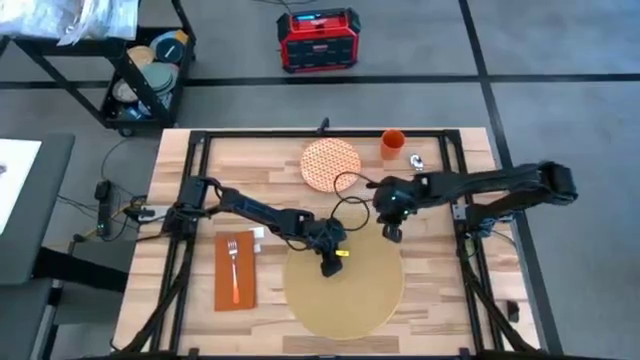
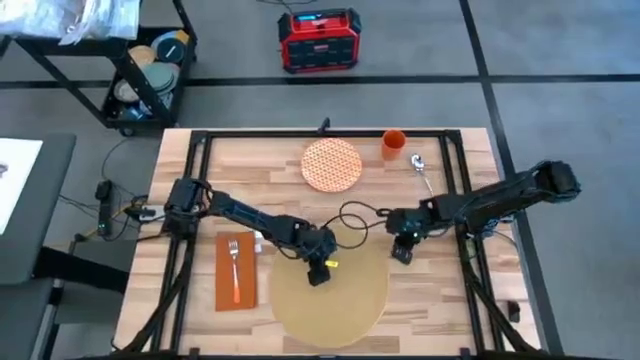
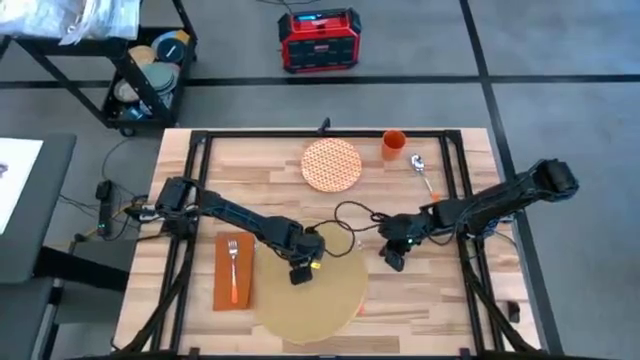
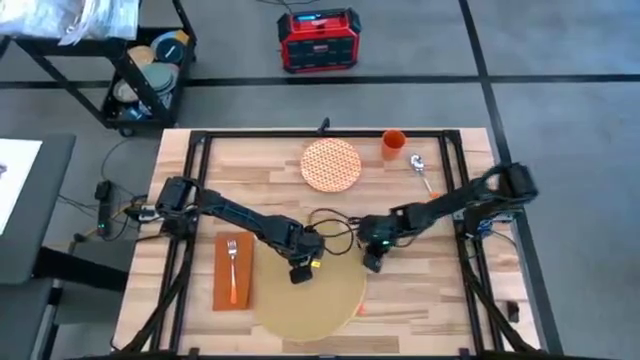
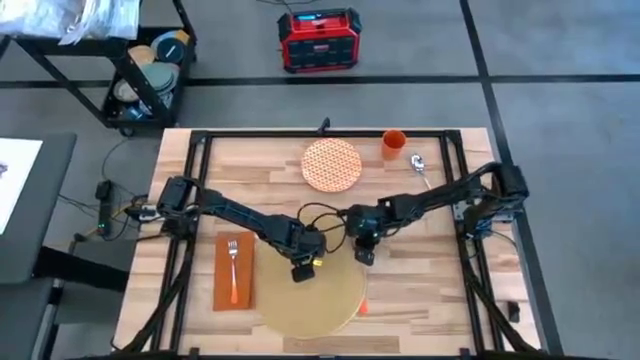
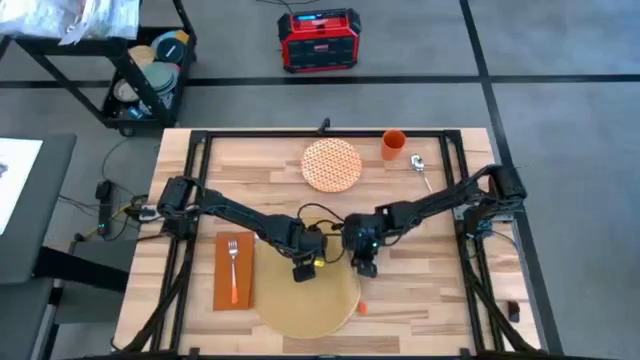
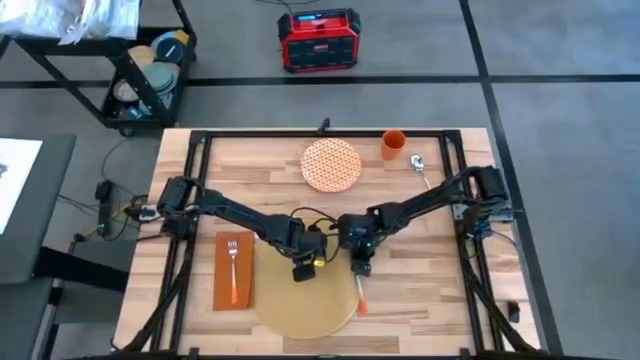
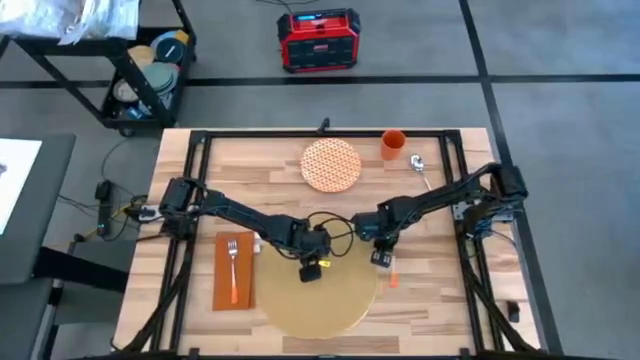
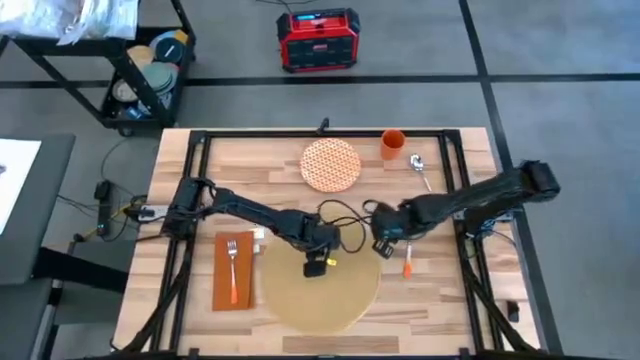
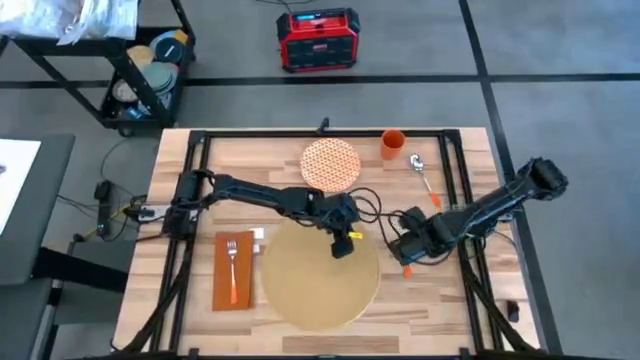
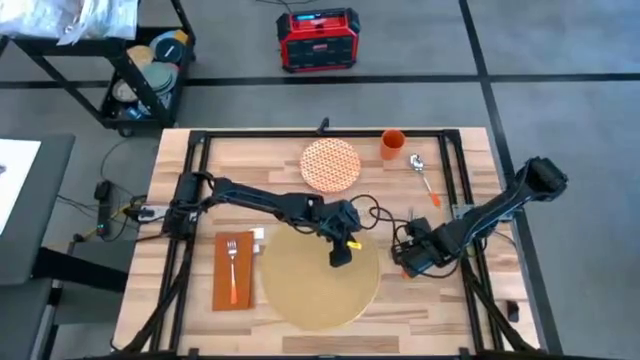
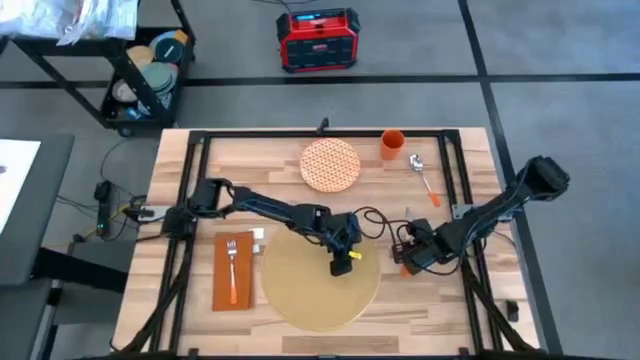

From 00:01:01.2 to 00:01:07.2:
Task: Set table place
Put the orange table knife on top of the brown placemat

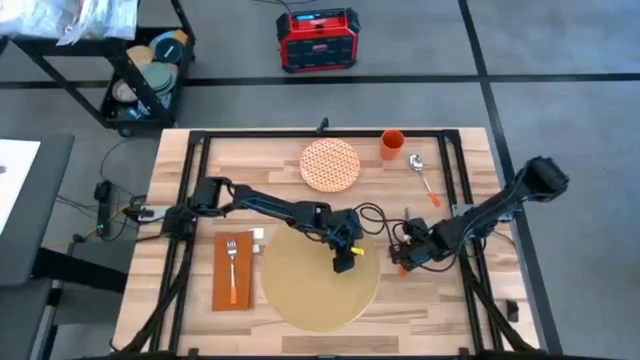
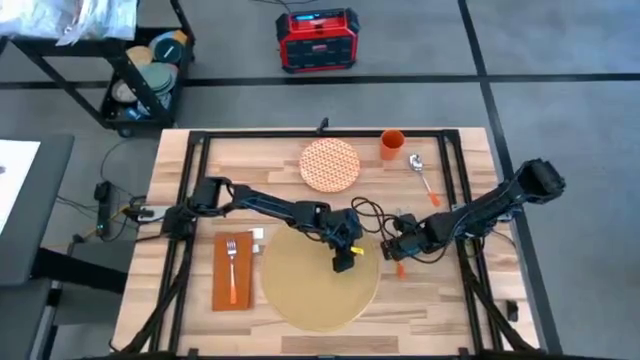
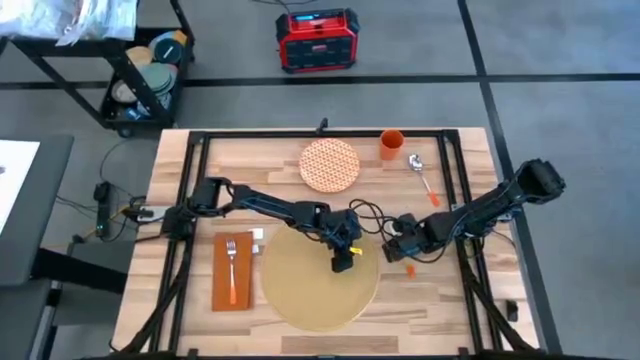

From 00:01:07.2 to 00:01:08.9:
Put the orange table knife on top of the brown placemat

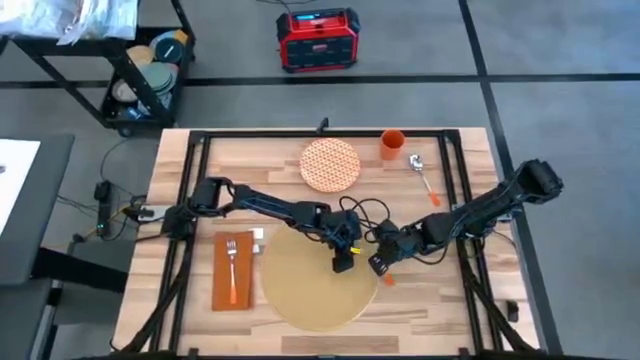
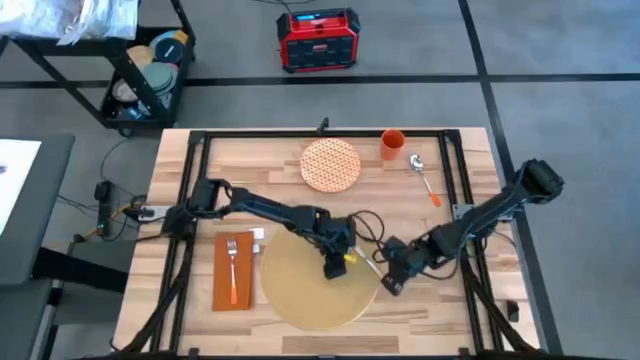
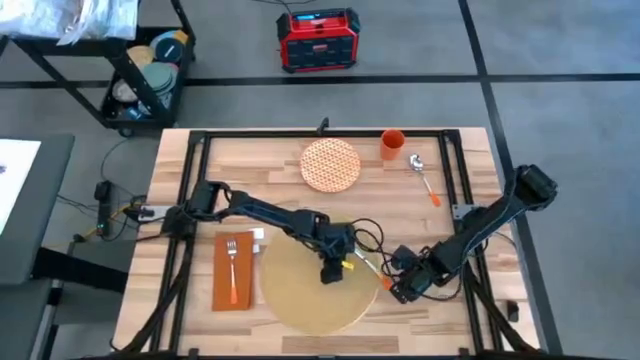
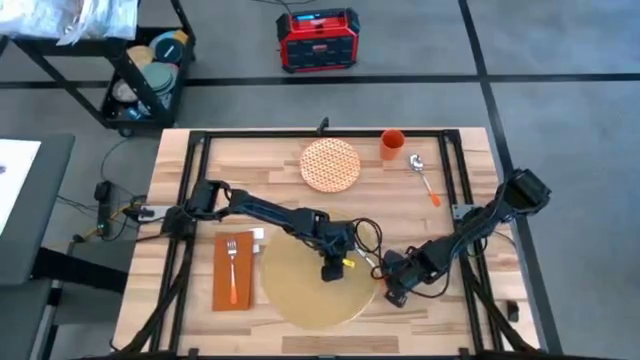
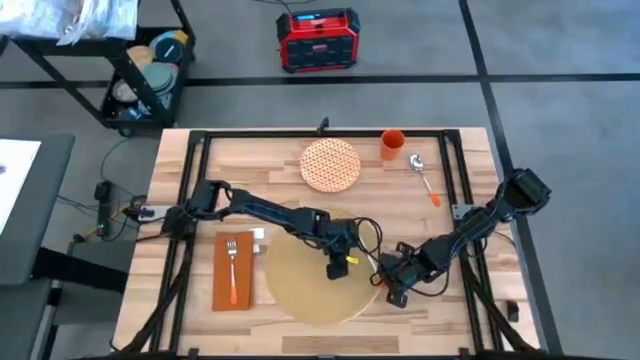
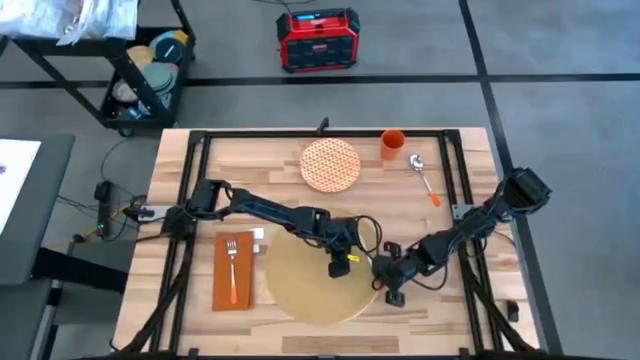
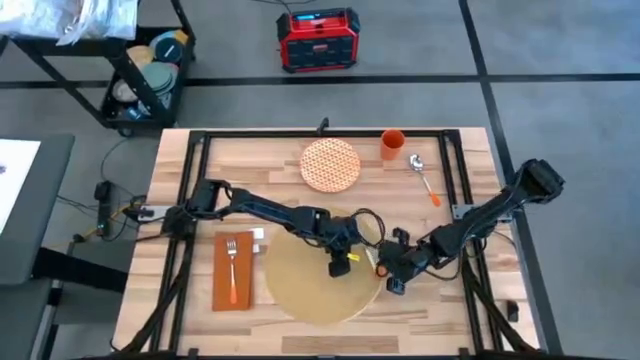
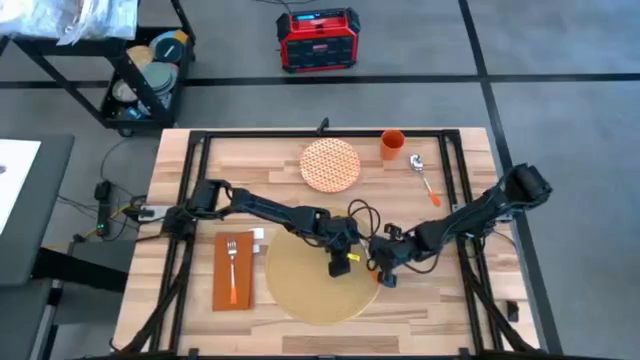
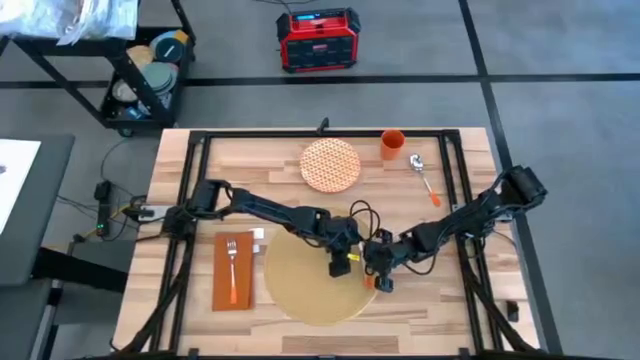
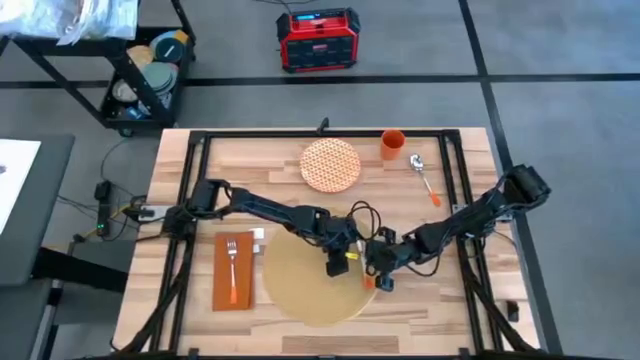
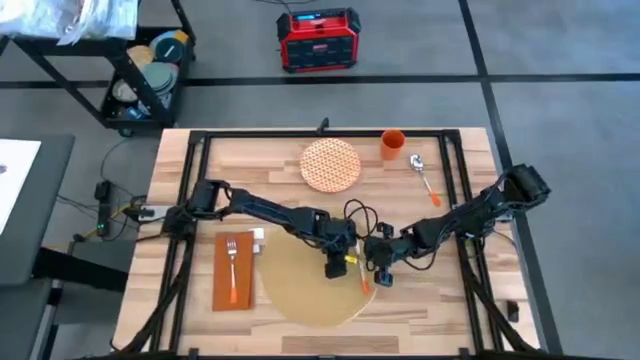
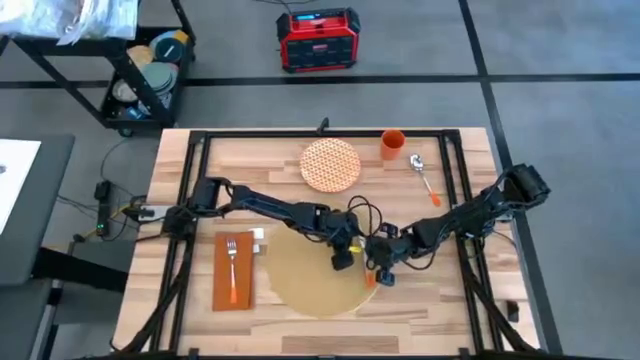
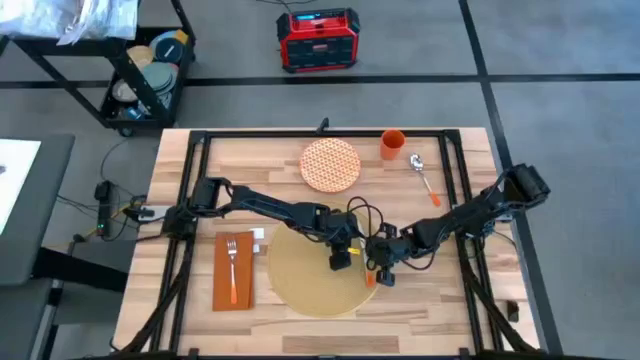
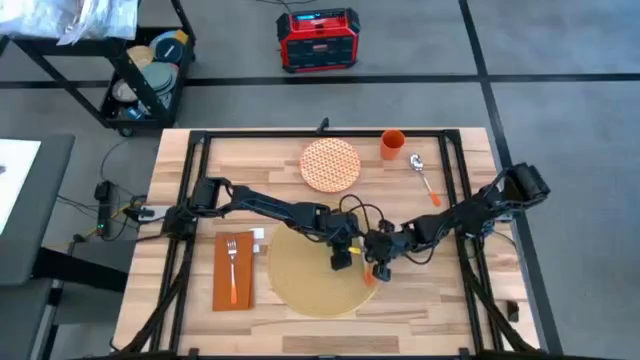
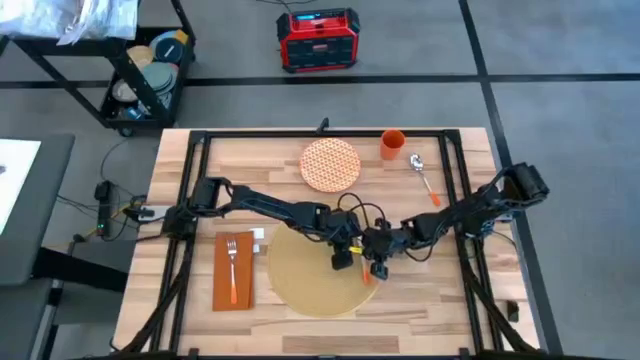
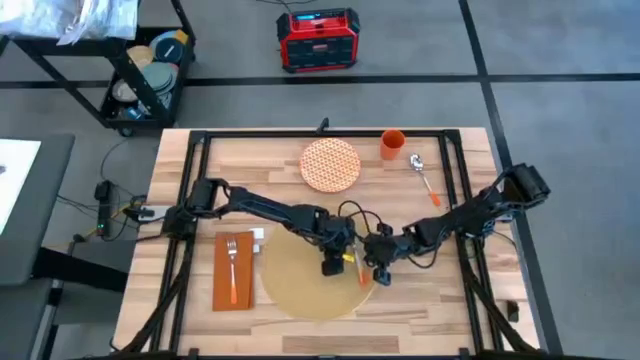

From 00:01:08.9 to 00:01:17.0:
Put the orange table knife on top of the brown placemat

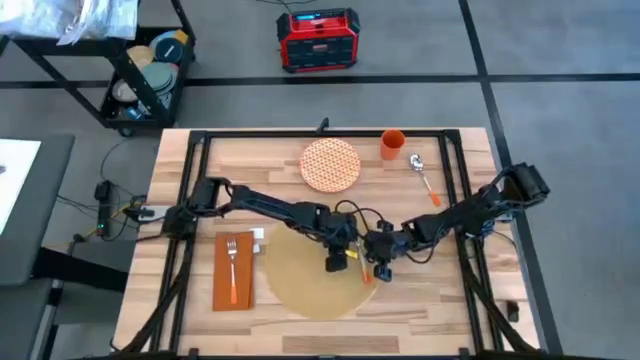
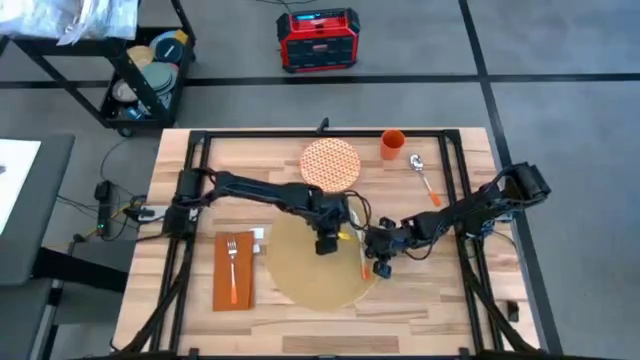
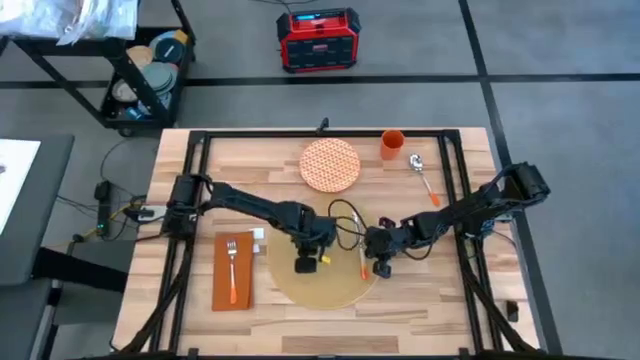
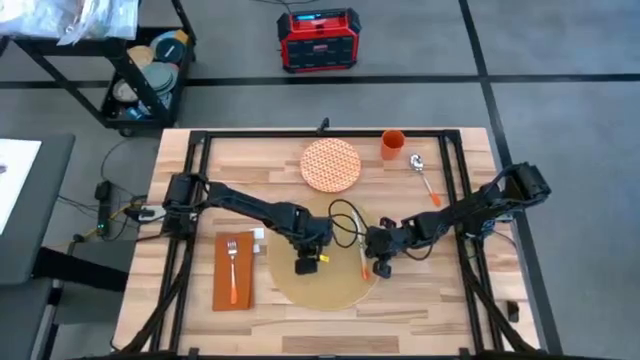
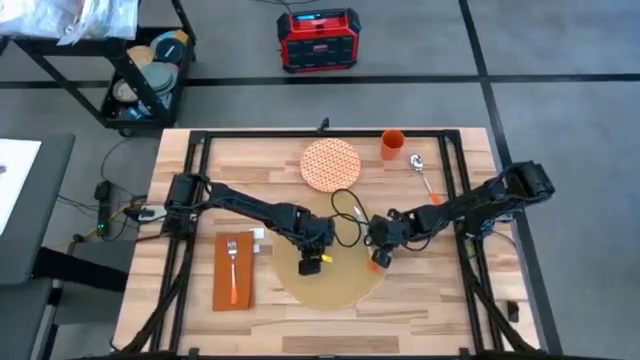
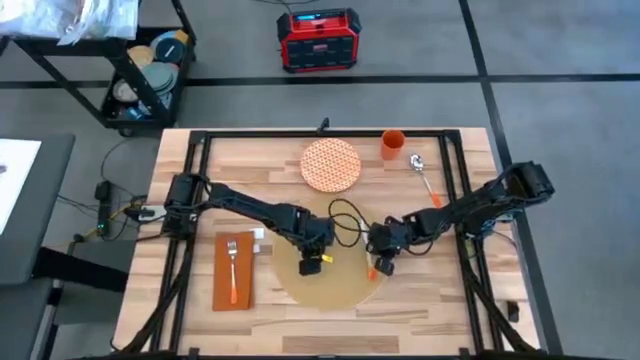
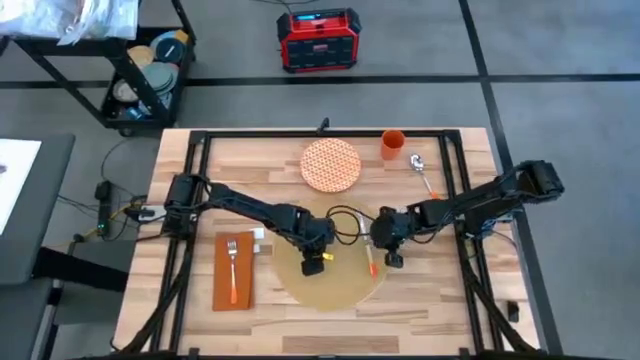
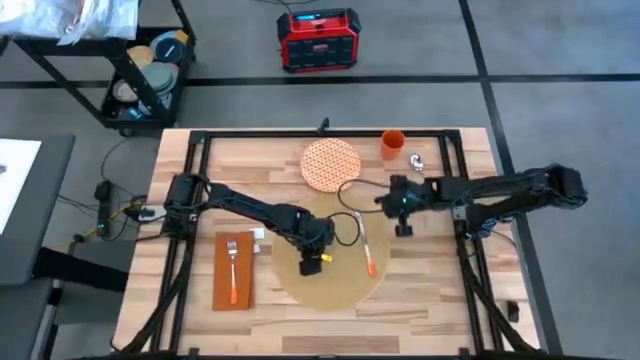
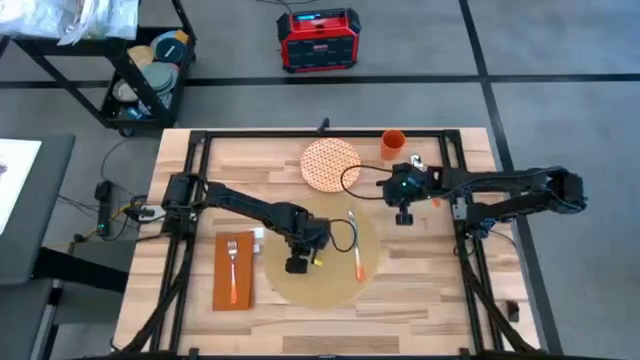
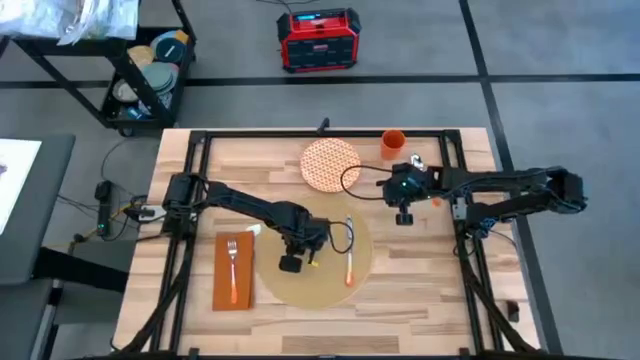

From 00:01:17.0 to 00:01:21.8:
Adjust the brown placemat
